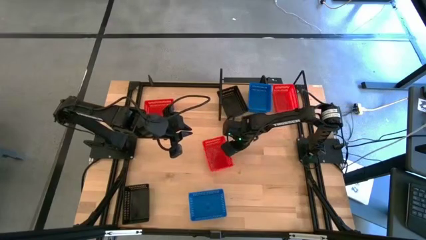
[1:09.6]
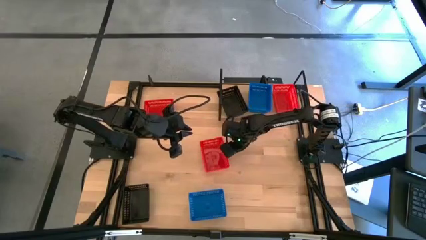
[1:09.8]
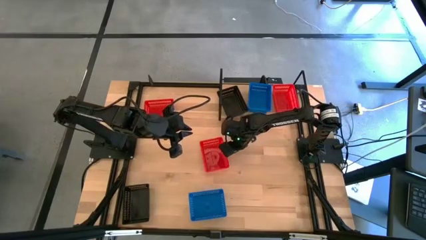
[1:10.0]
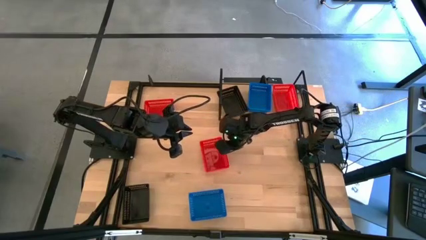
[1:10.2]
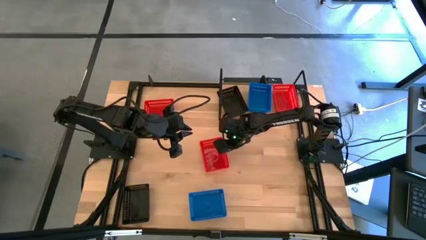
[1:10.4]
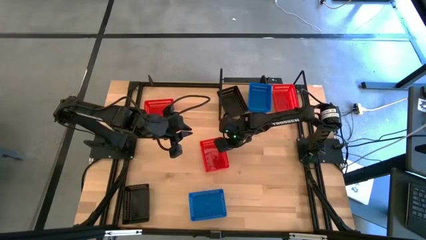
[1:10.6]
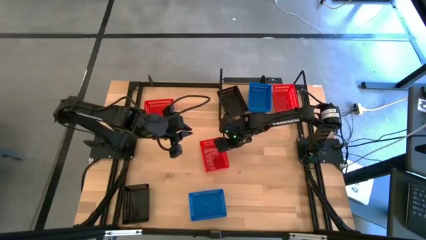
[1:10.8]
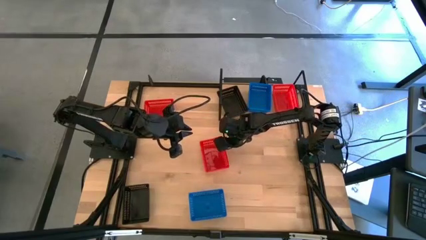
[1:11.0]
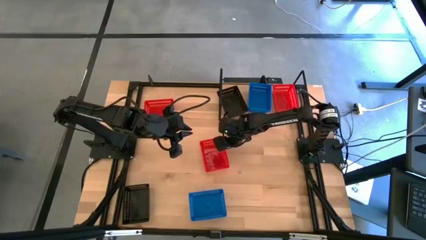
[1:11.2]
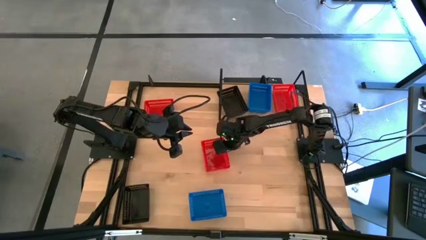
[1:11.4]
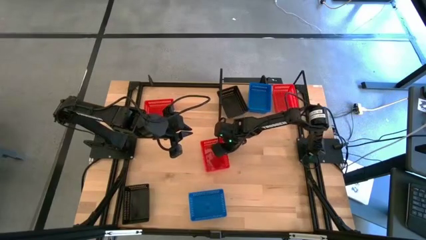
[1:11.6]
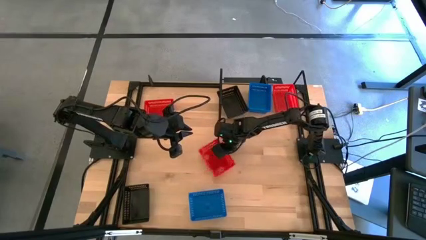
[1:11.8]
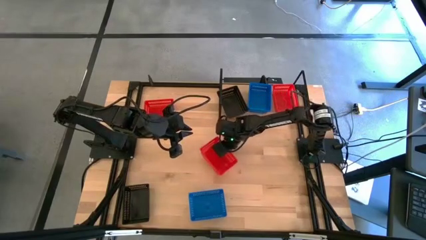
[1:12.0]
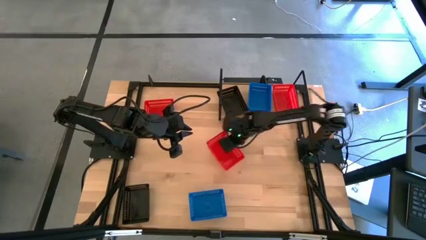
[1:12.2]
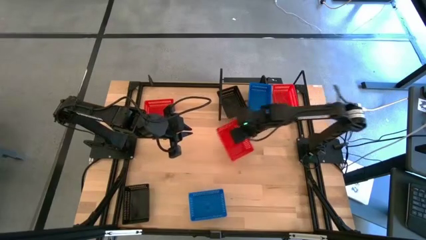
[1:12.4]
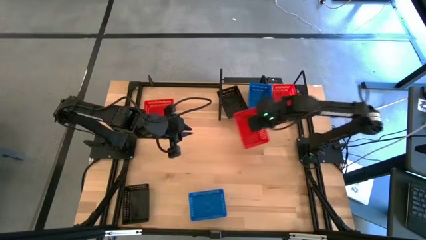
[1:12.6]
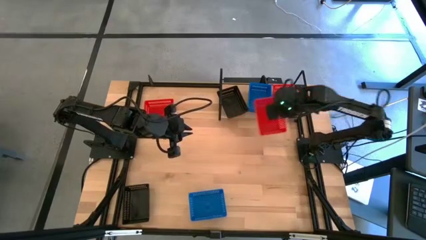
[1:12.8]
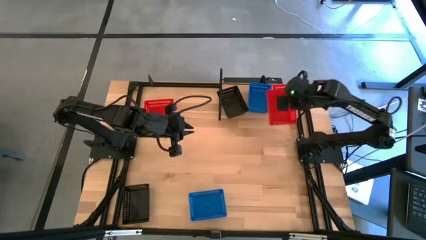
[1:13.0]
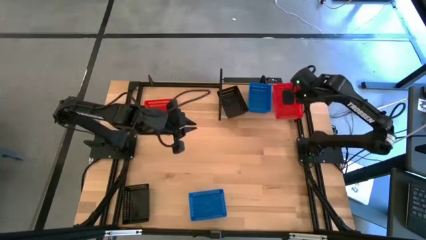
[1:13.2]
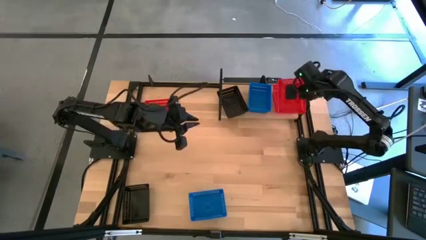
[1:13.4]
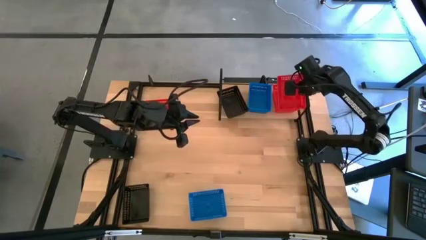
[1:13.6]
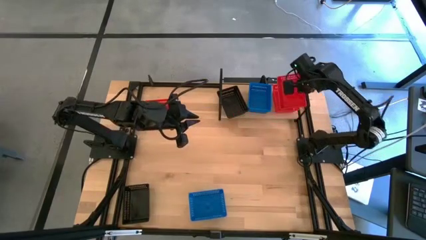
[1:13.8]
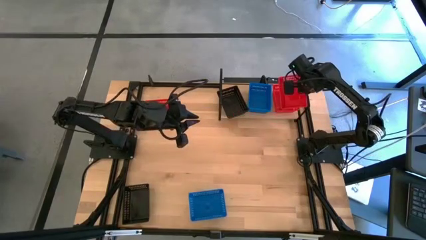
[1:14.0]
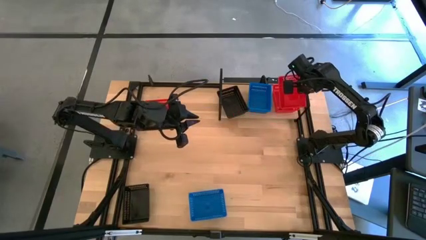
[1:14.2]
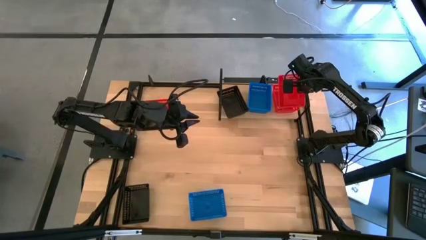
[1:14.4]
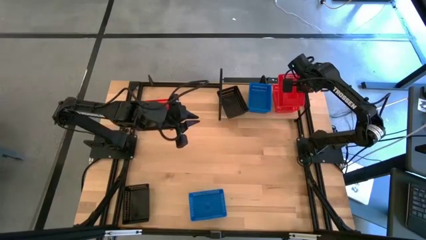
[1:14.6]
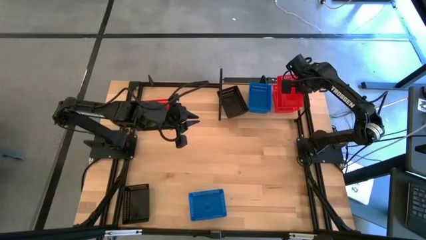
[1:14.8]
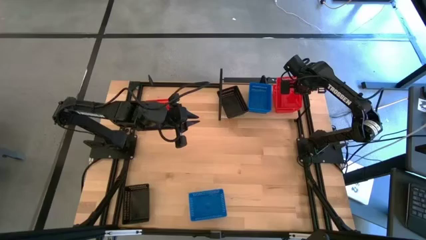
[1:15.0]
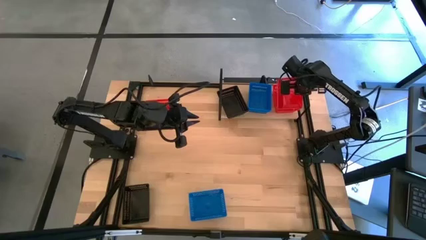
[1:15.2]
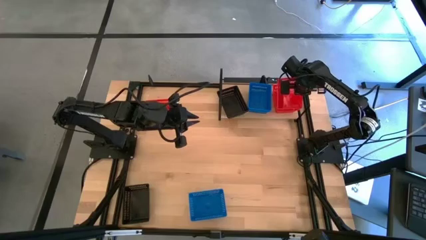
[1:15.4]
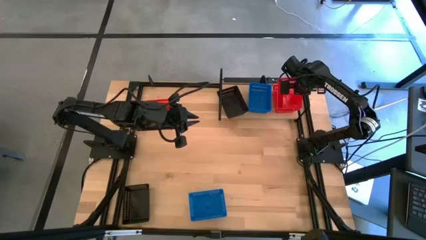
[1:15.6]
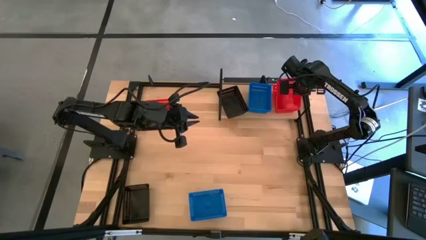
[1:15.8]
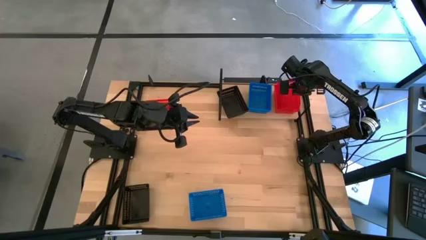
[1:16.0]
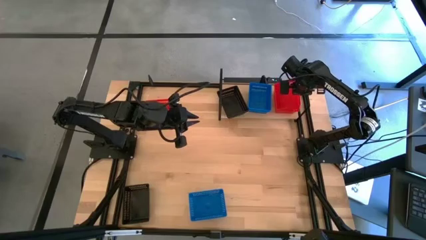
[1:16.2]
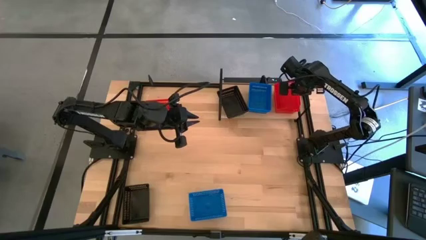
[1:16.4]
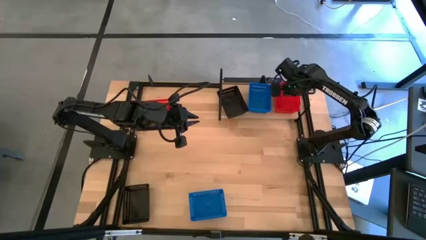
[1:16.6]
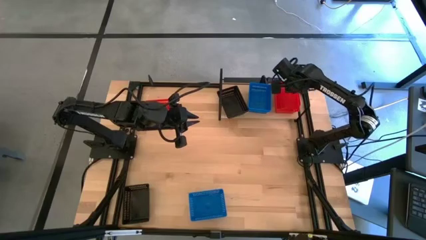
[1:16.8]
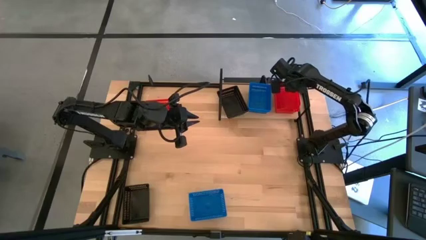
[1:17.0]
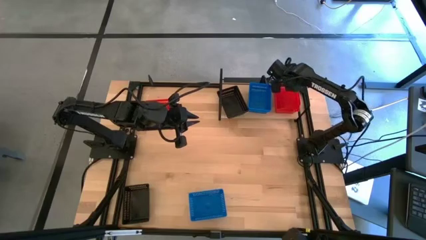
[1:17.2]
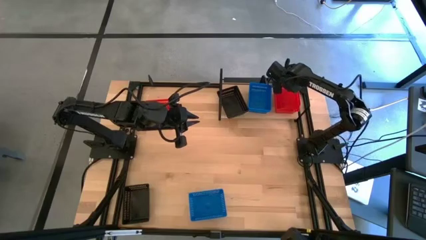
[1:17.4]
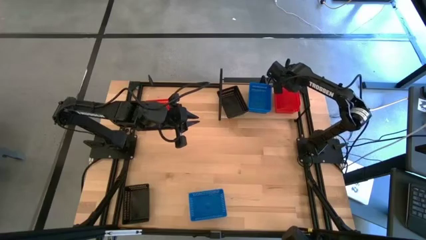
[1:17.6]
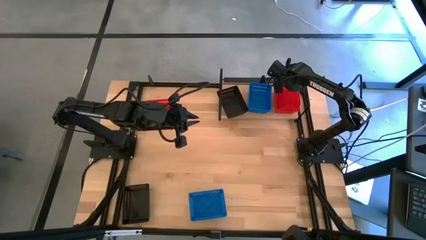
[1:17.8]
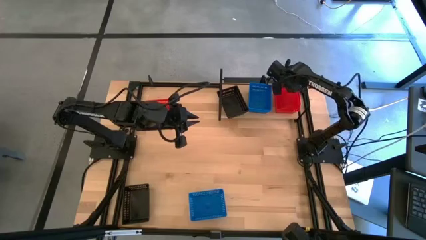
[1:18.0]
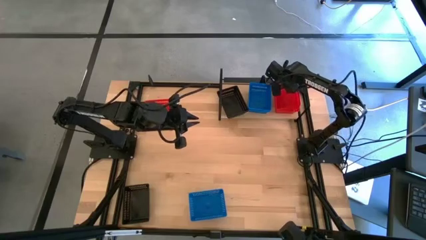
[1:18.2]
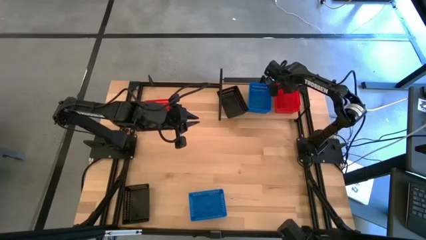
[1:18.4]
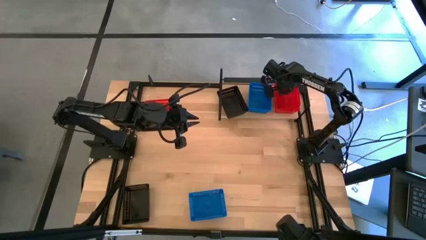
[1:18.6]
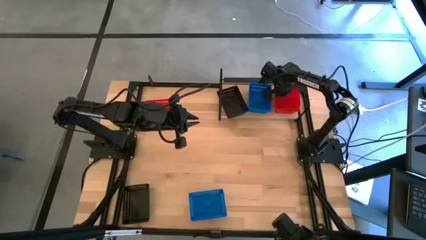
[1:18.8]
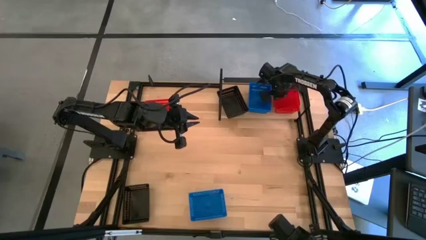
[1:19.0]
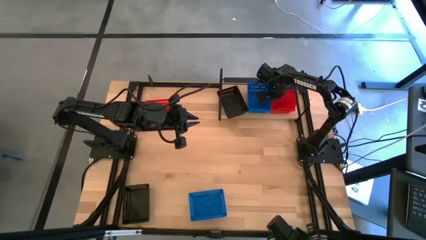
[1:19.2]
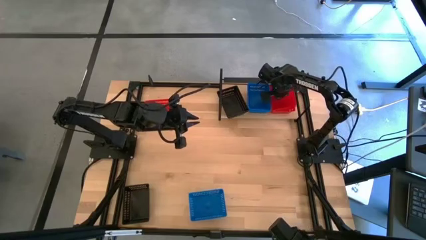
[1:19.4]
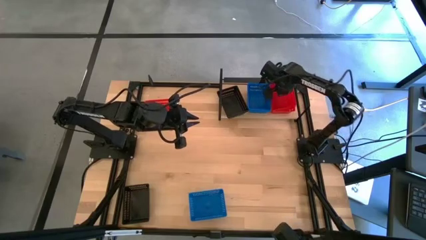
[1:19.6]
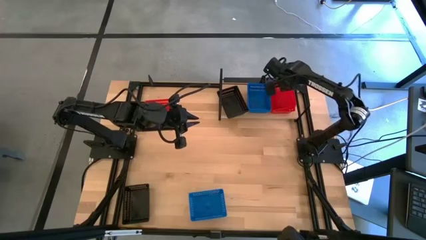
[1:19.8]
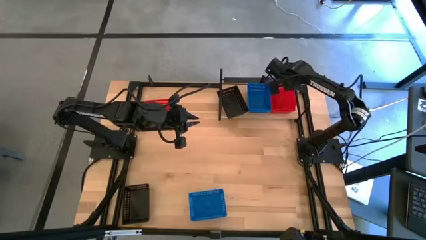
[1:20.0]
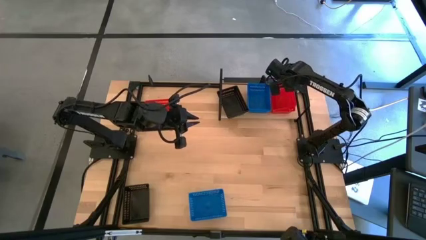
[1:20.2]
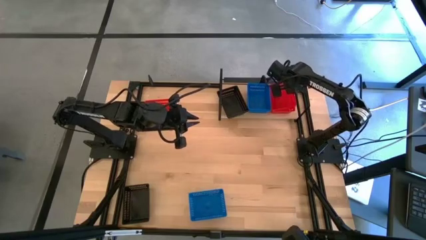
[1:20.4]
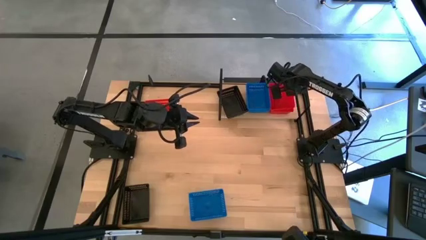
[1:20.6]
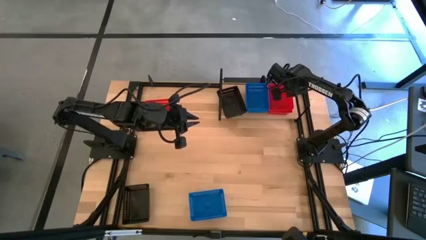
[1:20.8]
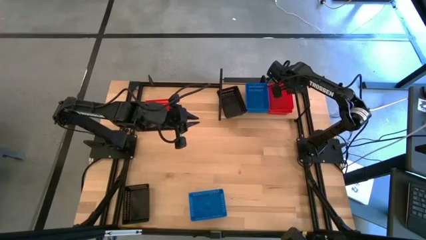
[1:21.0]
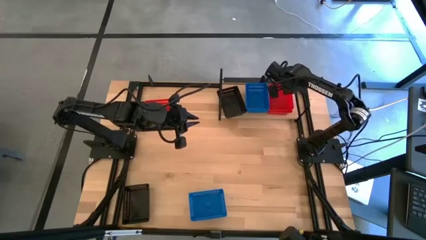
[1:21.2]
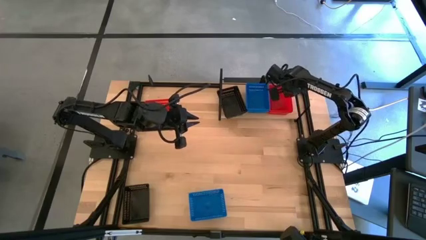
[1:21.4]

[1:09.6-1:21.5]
Task: Stack baskets on shelf by color
Stack the bottom red bin on top of the other red bin on the shelf

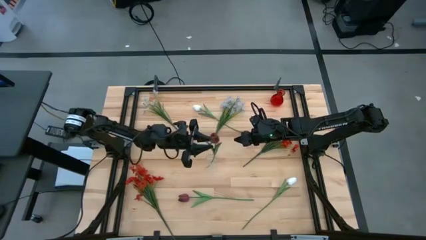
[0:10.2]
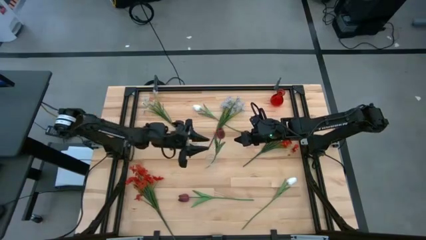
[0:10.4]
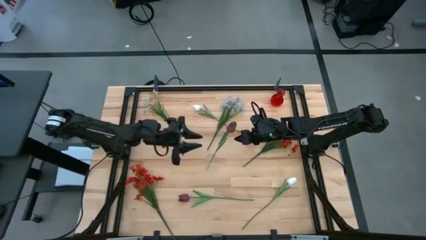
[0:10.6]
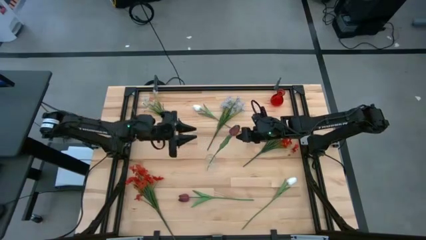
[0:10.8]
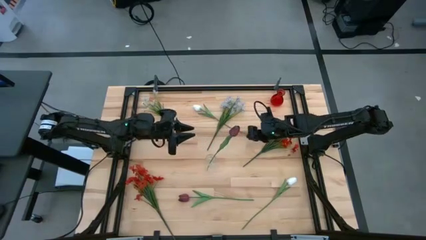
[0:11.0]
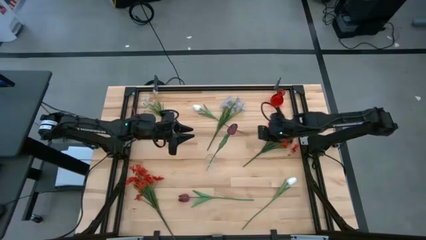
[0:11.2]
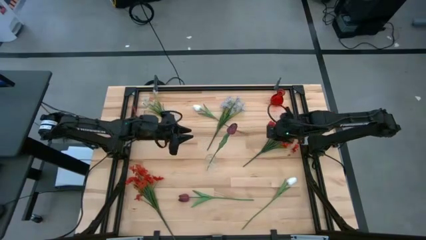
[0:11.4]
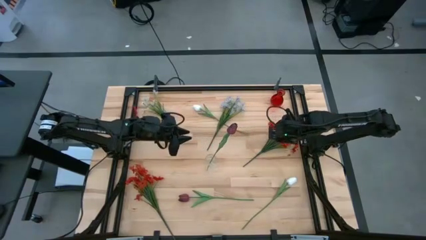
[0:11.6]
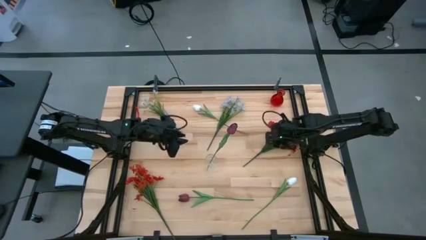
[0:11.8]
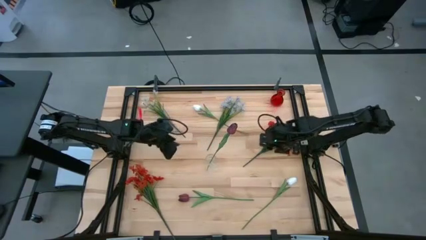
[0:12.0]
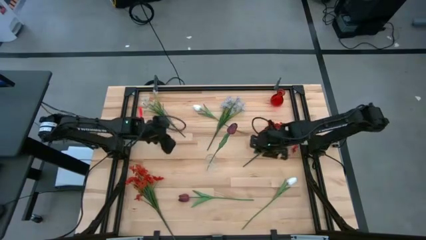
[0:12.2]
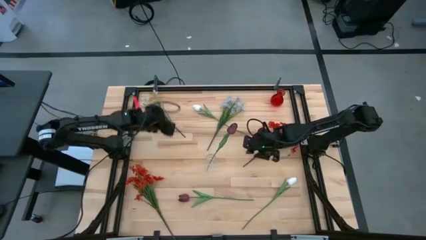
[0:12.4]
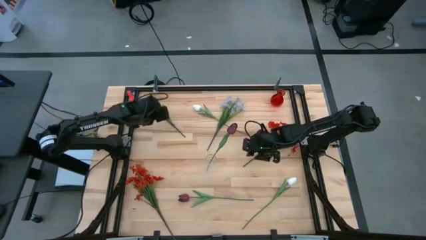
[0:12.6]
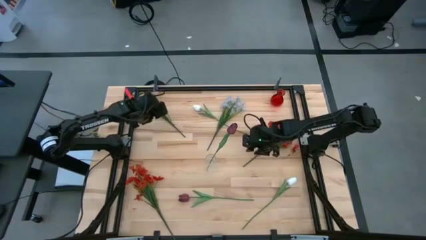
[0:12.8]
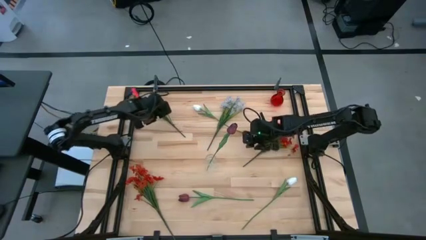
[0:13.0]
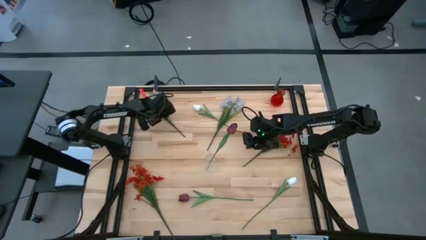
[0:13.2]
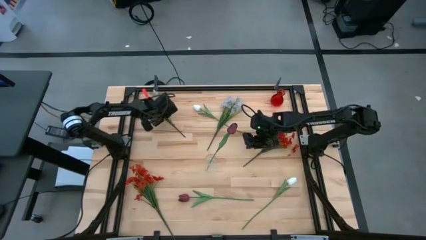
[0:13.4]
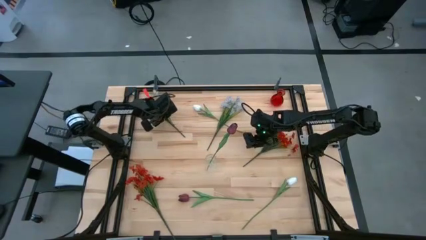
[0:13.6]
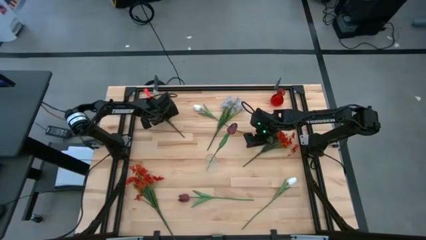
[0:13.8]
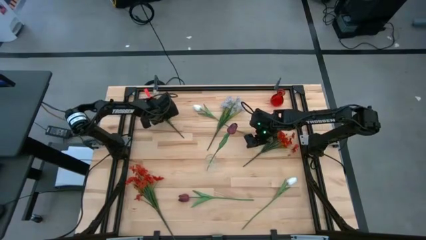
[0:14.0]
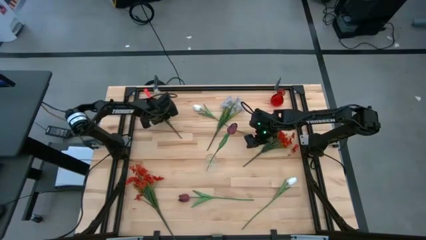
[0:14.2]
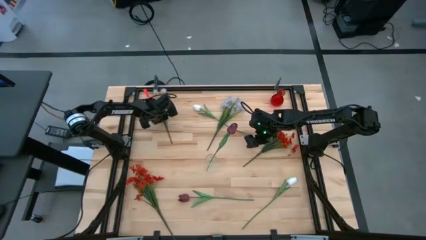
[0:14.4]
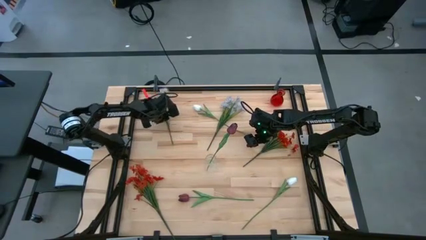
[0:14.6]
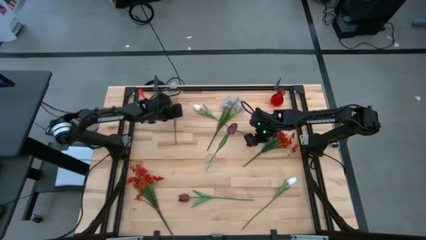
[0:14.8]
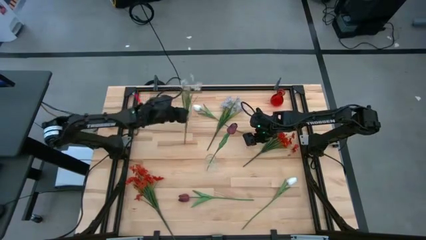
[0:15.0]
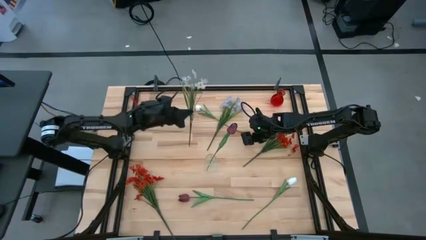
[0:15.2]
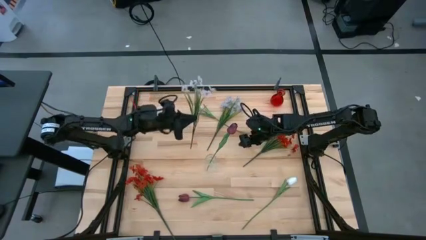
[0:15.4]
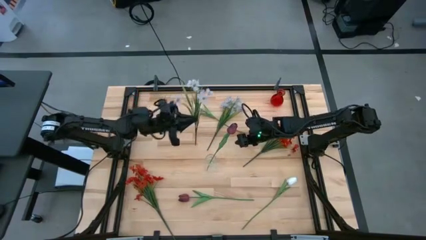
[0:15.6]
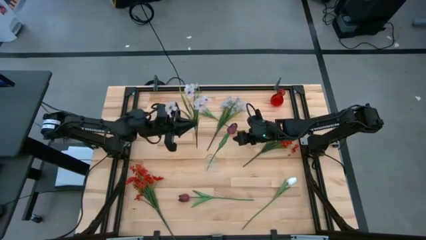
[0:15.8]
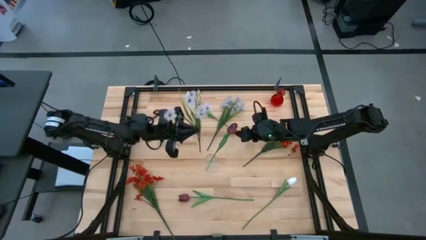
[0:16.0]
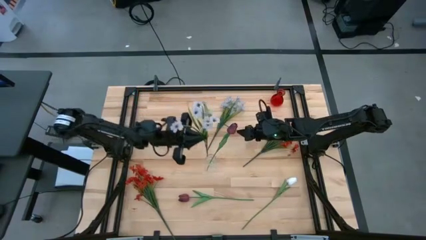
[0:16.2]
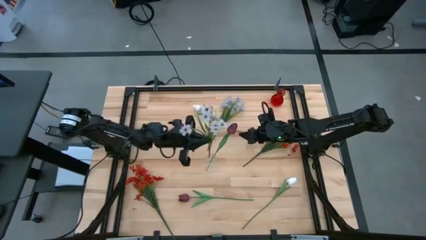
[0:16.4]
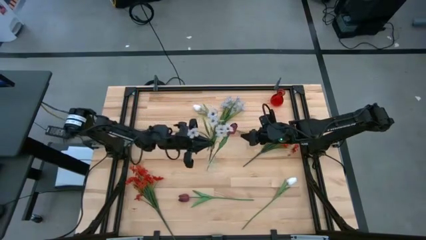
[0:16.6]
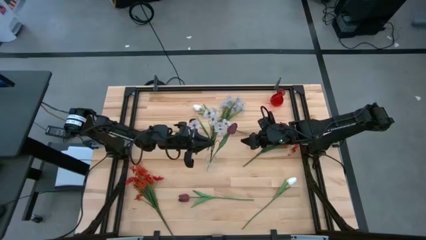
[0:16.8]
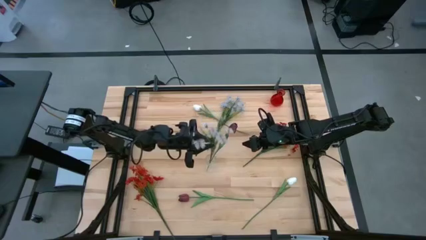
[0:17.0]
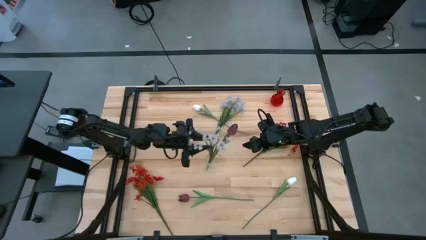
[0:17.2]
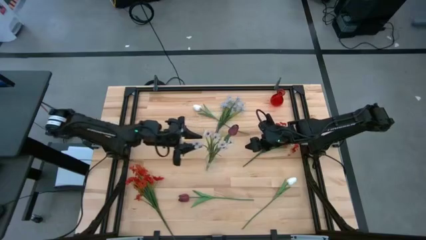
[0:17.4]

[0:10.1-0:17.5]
Task: Sort flowers into vase by color
Put the left white flowers into the transparent vase
